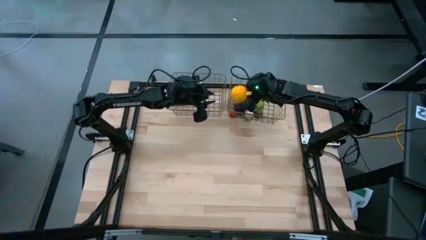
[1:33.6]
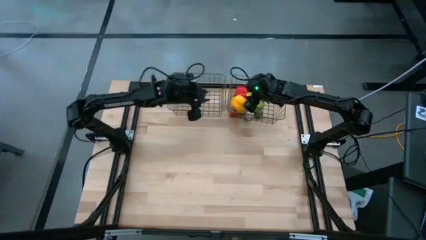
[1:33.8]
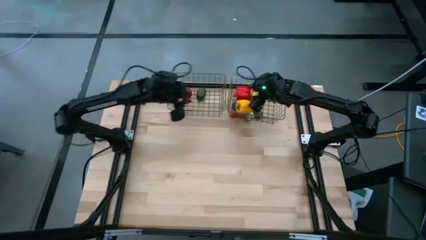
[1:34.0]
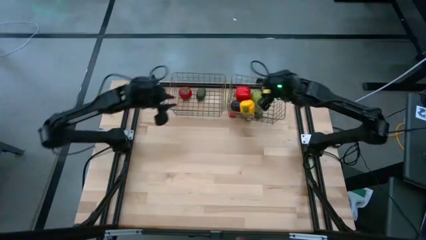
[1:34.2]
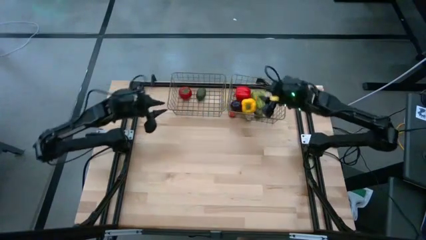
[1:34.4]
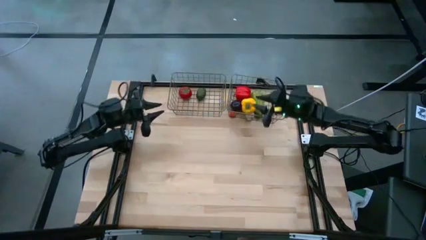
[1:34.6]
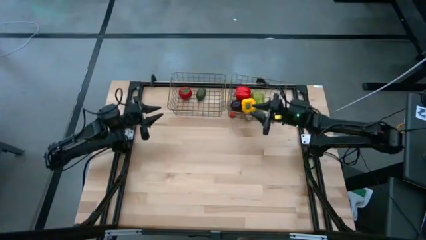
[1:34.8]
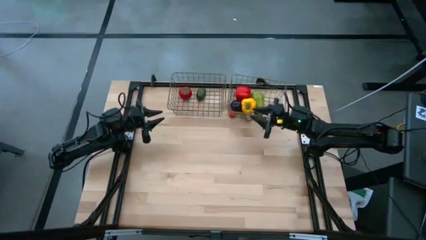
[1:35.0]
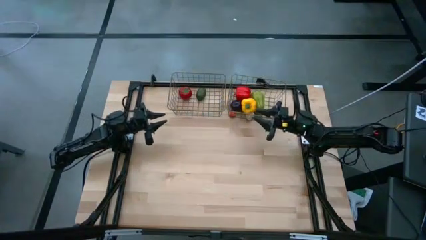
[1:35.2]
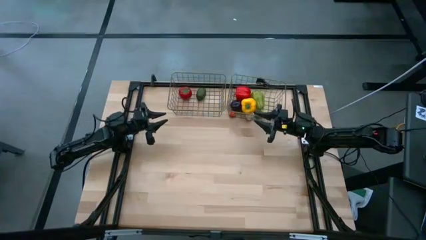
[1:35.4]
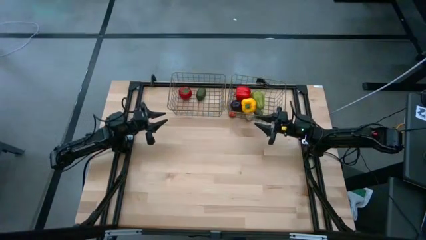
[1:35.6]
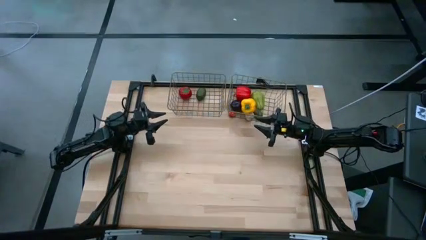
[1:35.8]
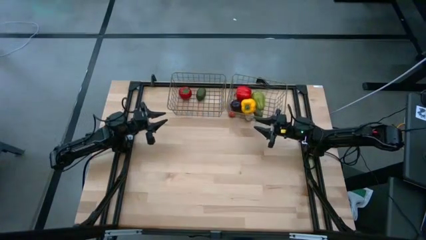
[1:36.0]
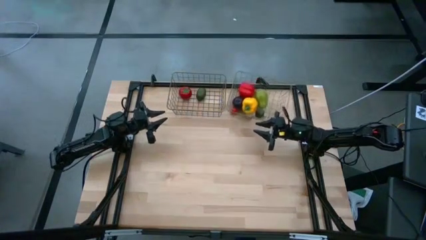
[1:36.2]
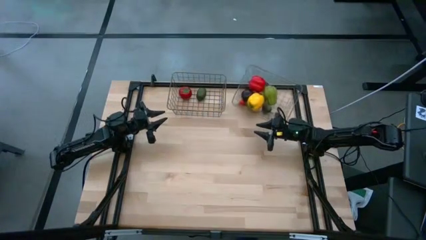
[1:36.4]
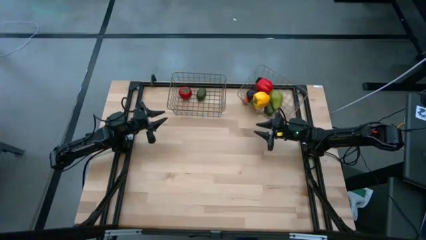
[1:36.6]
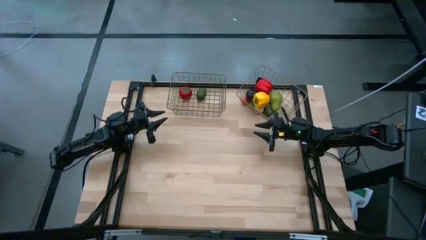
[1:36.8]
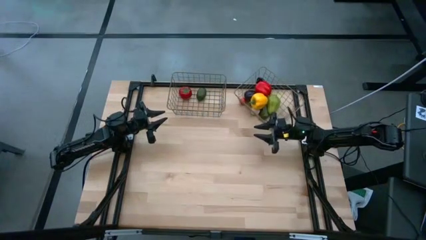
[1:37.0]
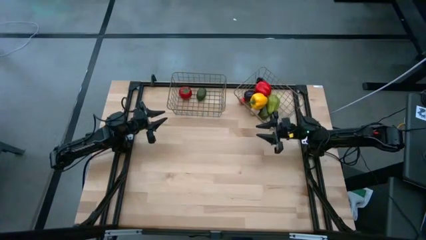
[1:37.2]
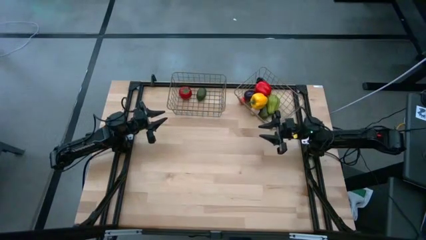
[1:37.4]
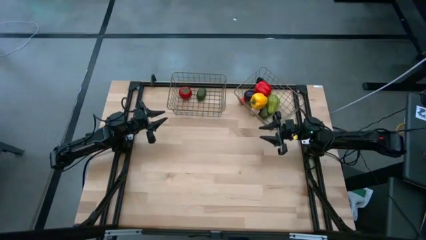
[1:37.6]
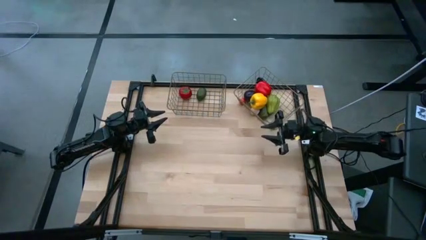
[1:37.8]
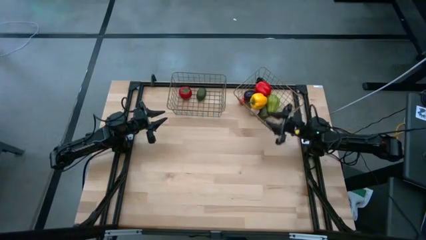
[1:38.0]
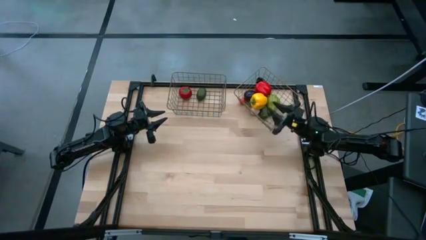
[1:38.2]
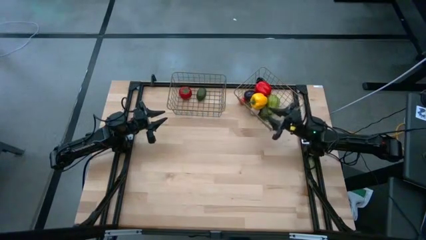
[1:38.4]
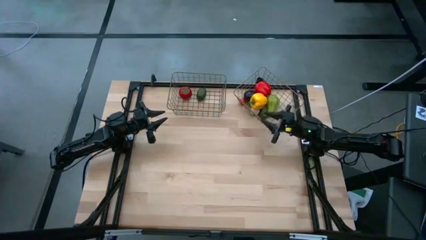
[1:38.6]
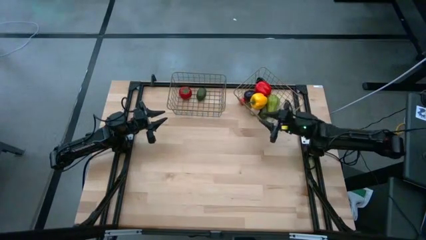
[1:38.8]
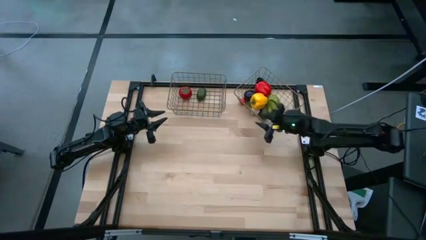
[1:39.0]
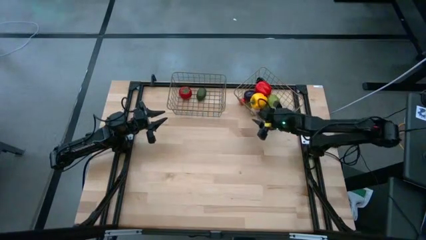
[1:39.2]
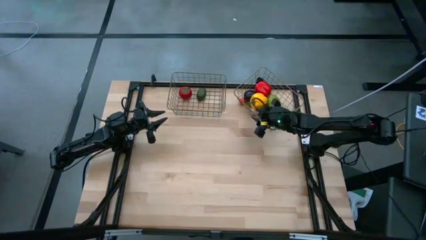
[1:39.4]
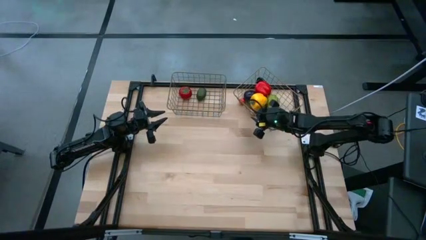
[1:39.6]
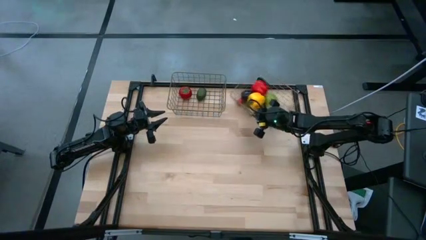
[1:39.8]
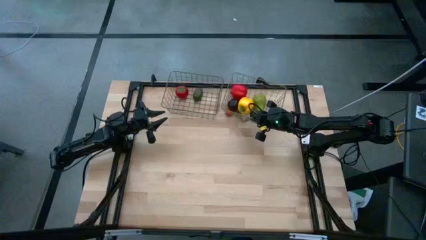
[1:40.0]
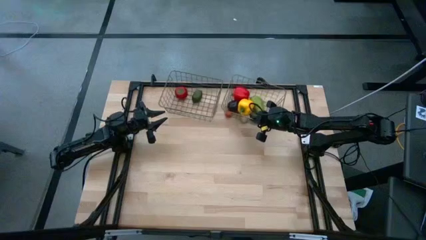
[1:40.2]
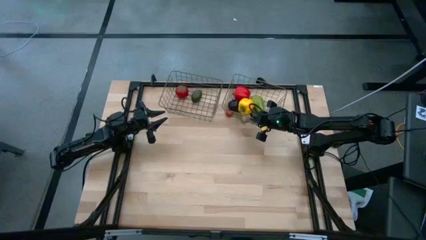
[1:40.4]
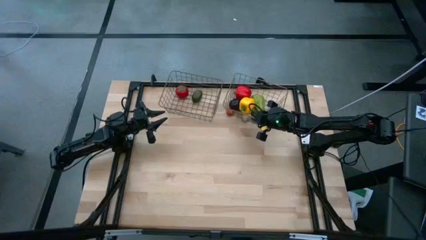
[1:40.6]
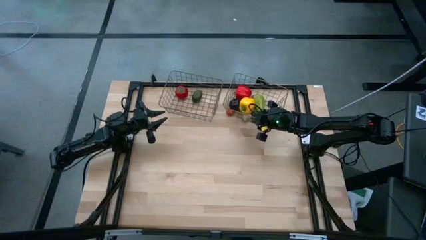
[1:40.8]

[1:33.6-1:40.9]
Task: Sort produce into baskets
Adjust the right gold wire basket

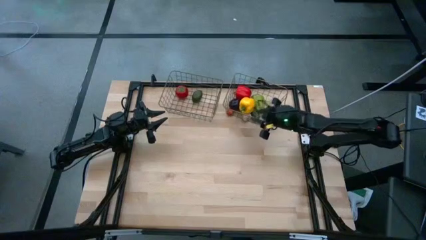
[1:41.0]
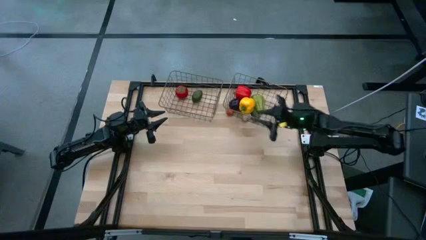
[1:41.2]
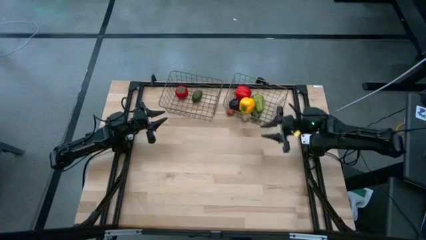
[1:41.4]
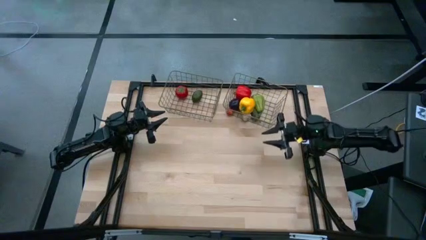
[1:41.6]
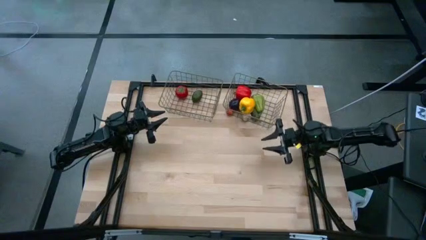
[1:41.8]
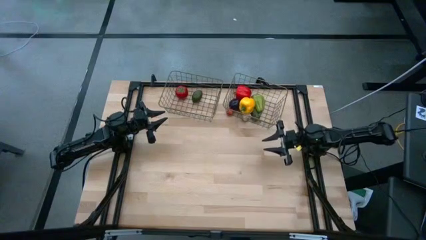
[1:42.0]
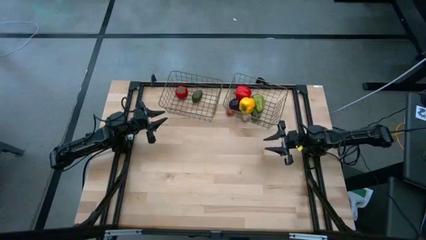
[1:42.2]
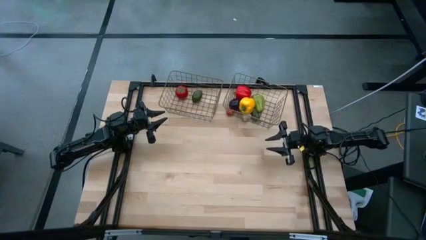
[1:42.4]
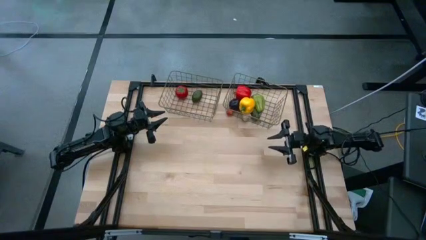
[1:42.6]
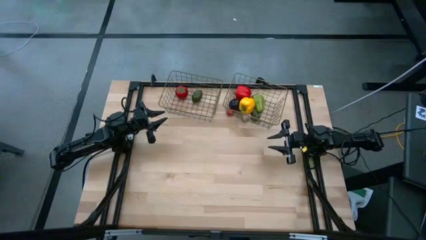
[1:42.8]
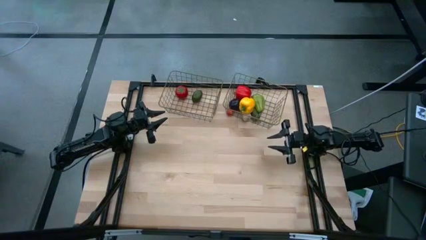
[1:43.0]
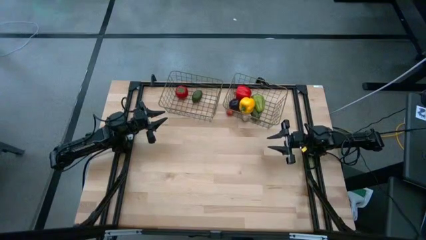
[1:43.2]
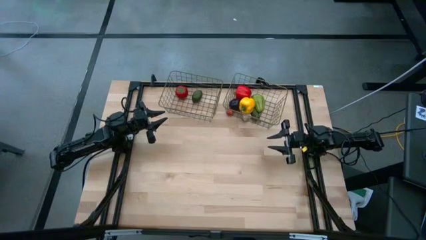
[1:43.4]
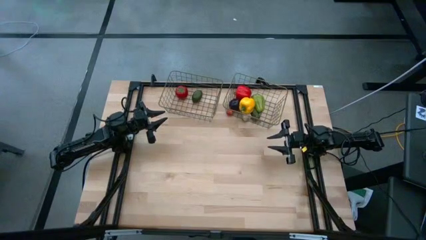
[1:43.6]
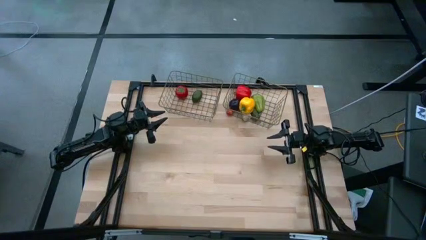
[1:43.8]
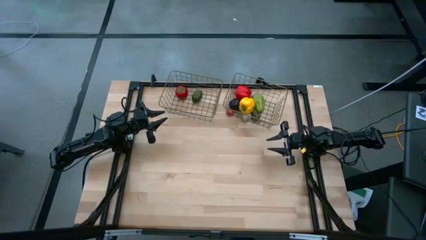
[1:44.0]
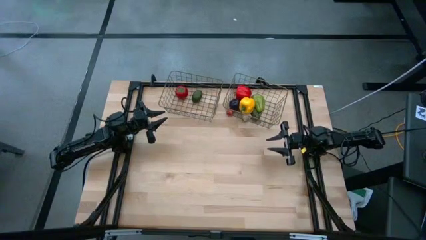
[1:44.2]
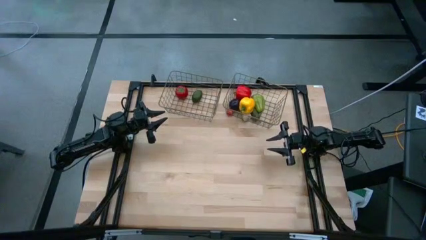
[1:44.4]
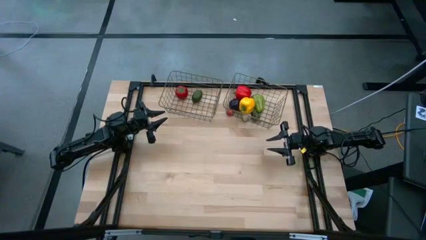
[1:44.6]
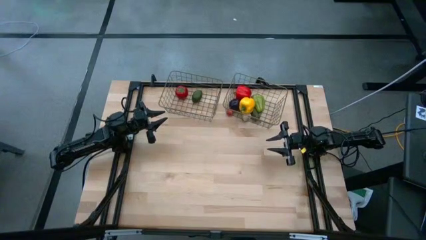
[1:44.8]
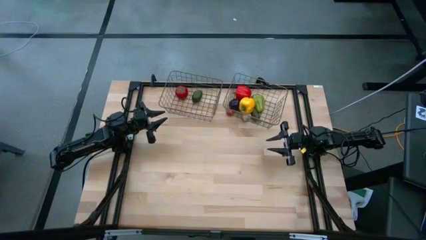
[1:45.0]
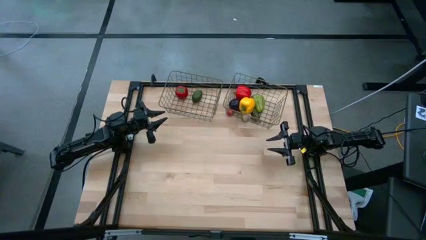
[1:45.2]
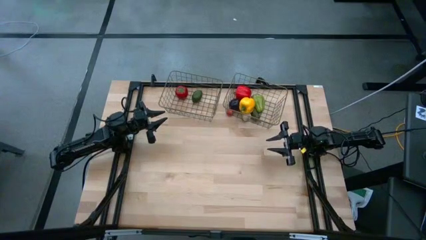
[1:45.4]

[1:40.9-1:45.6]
Return to Home Position
